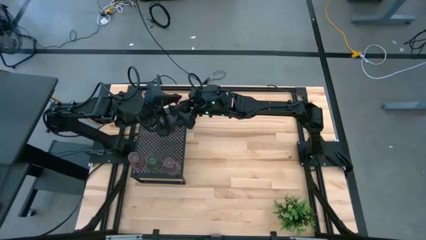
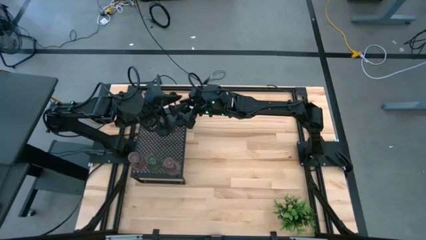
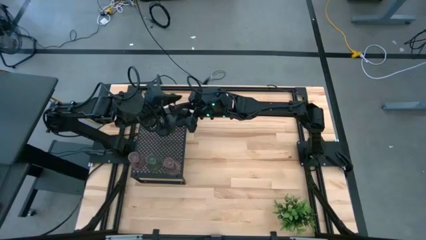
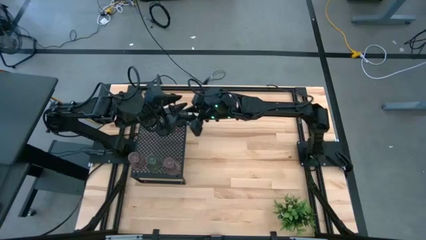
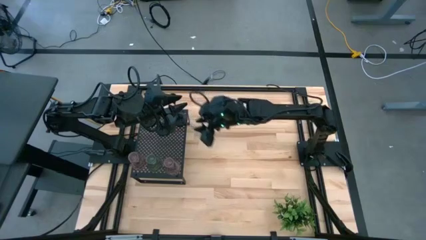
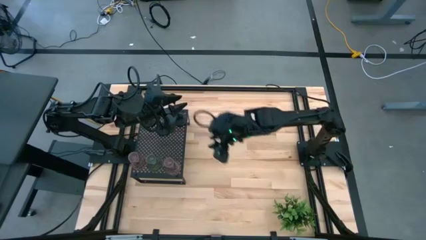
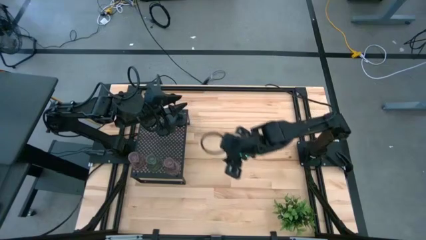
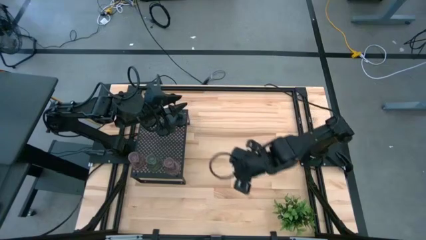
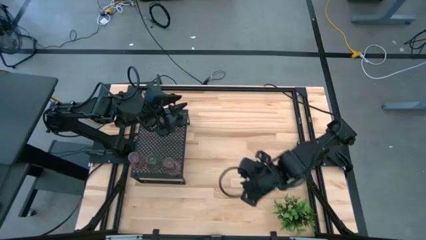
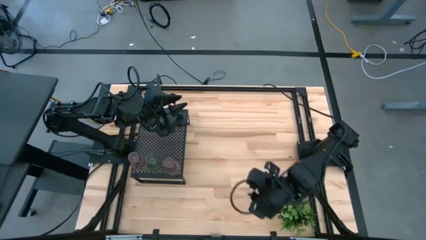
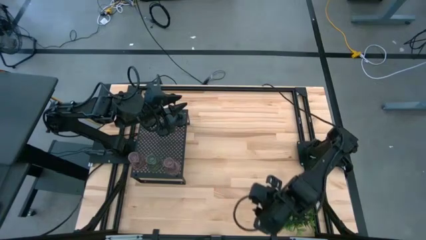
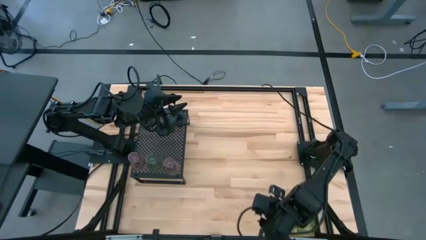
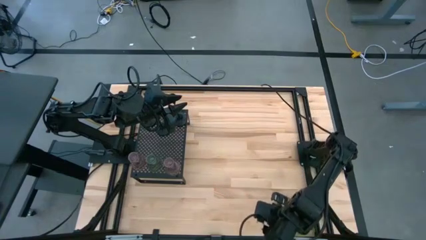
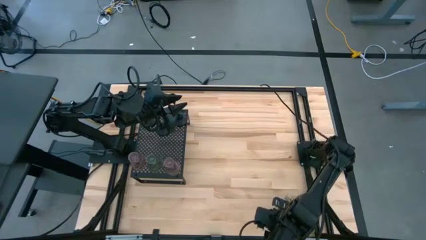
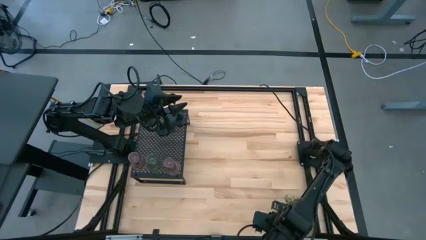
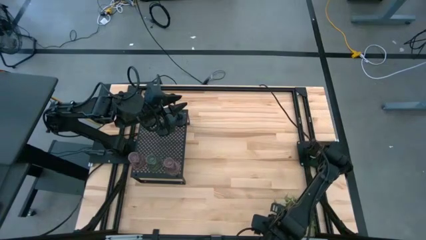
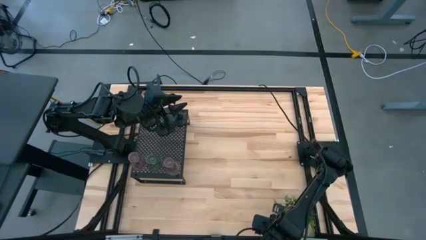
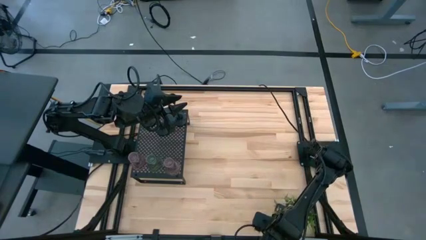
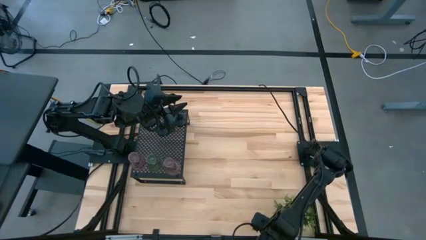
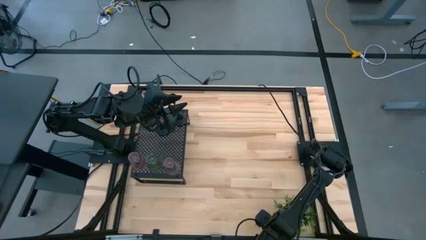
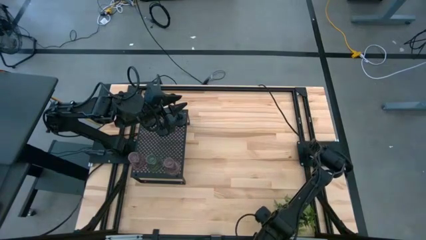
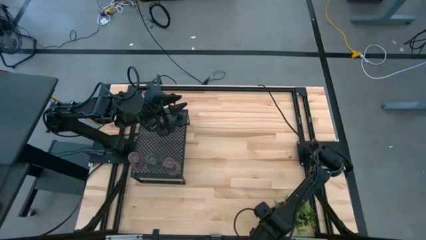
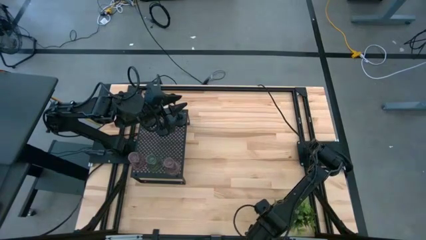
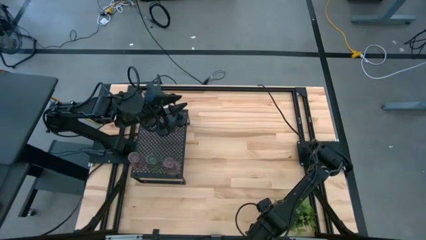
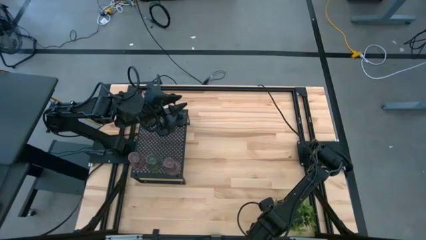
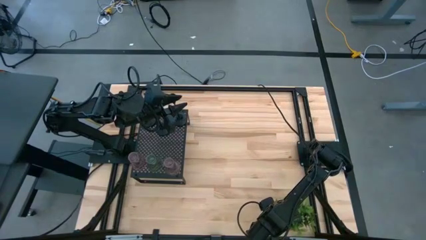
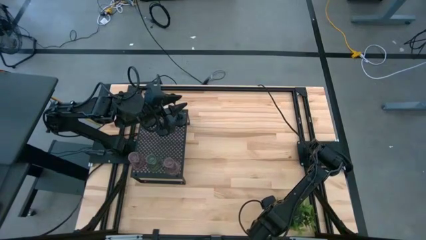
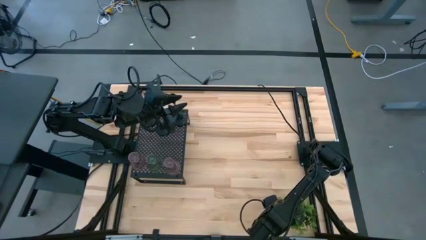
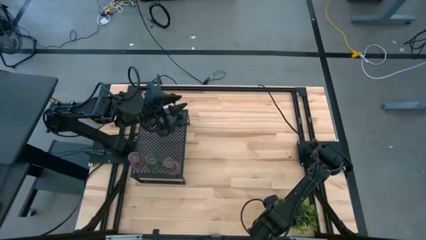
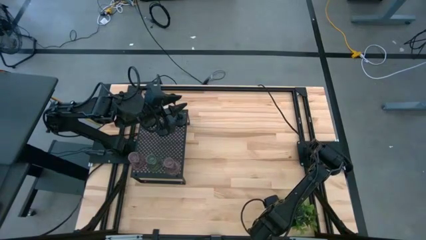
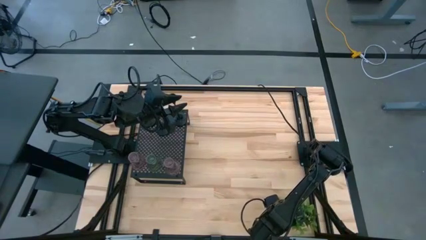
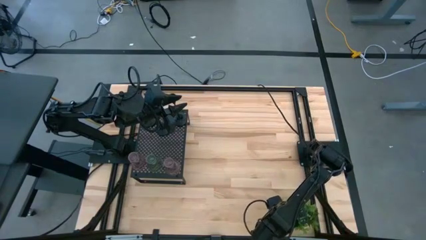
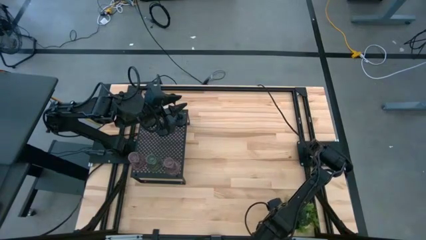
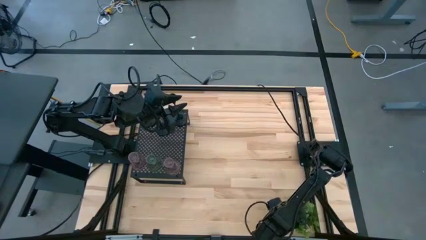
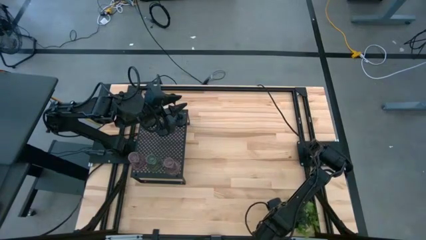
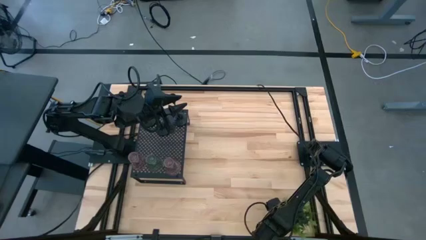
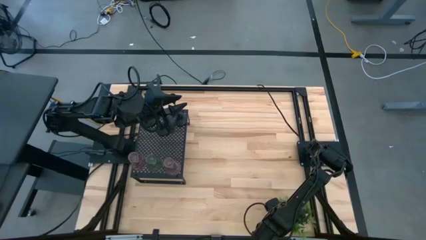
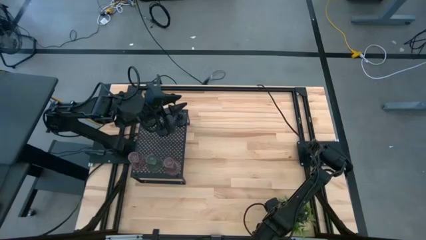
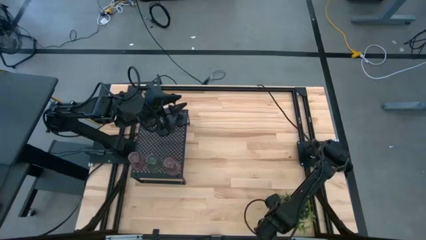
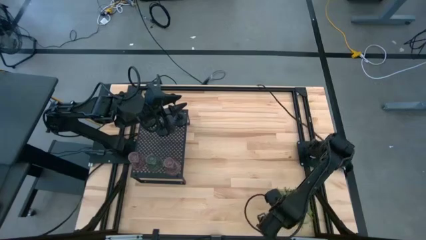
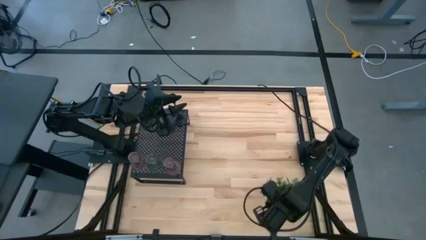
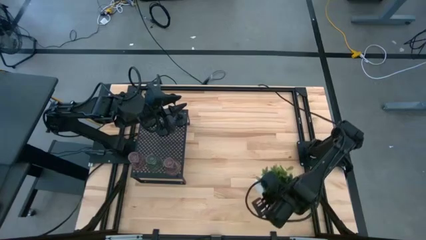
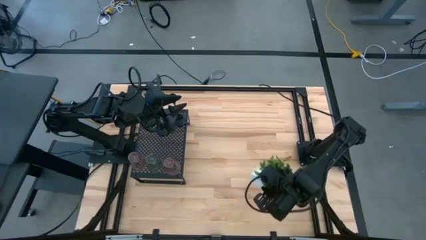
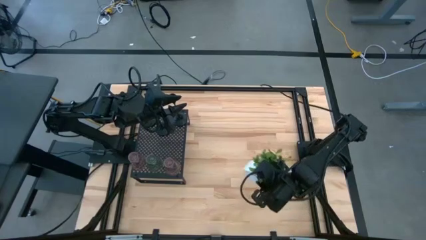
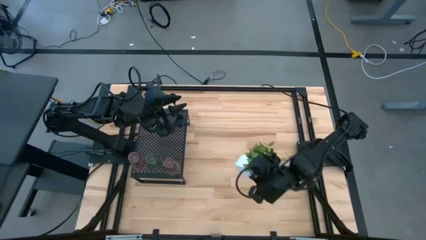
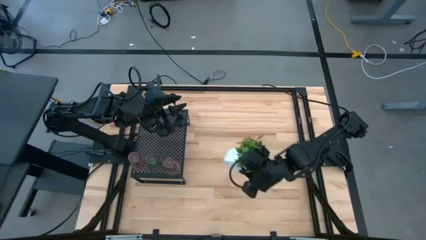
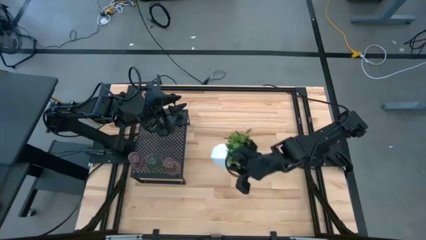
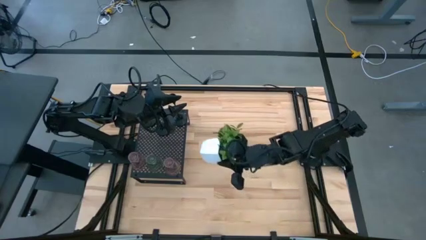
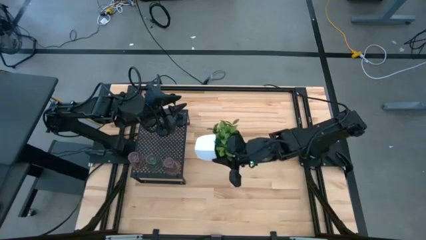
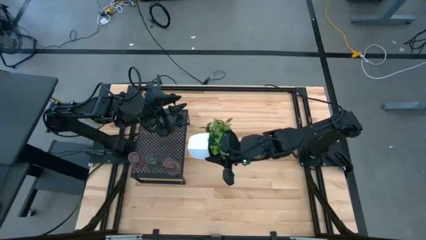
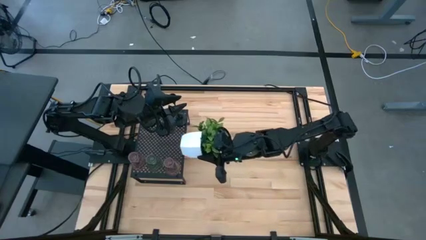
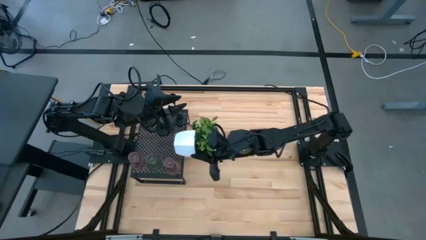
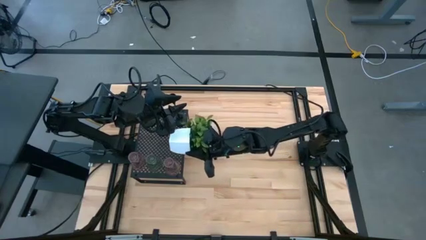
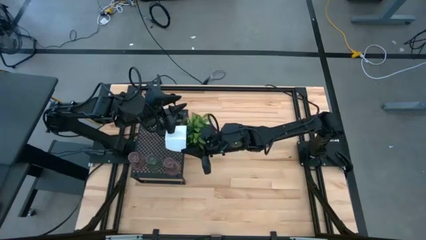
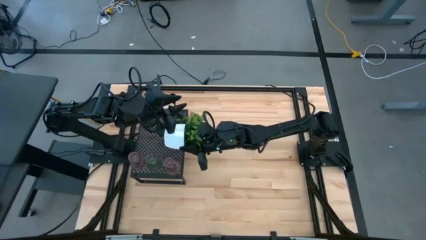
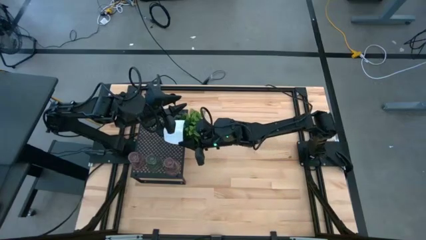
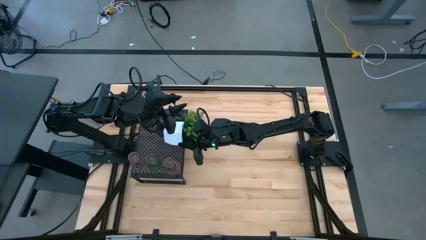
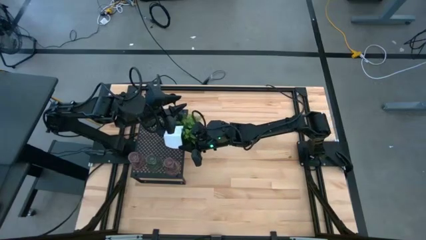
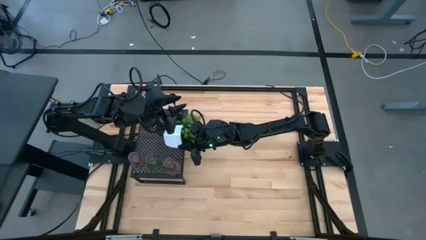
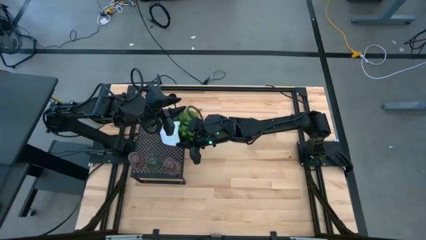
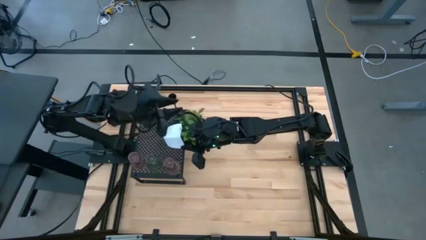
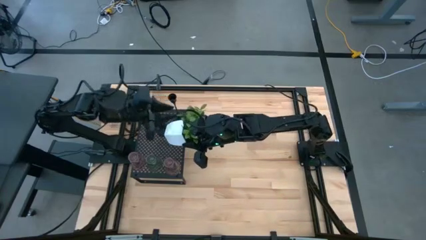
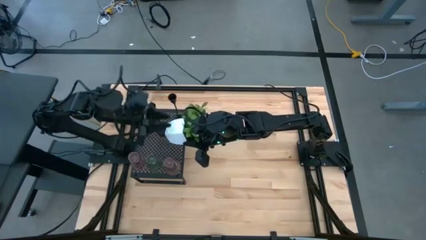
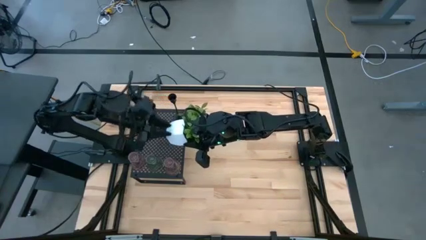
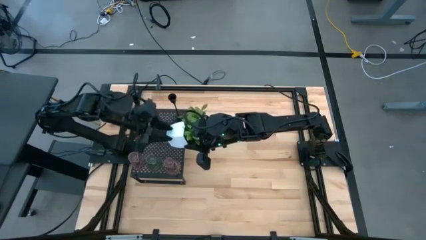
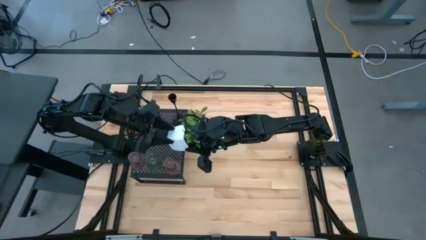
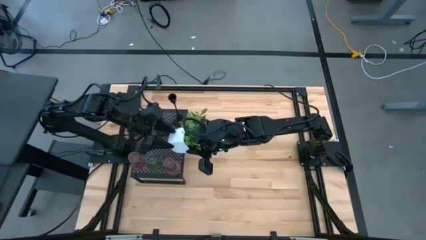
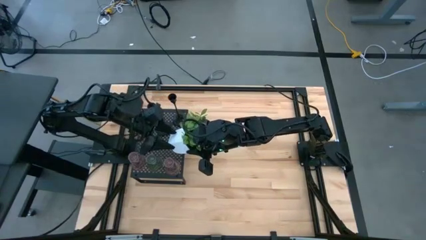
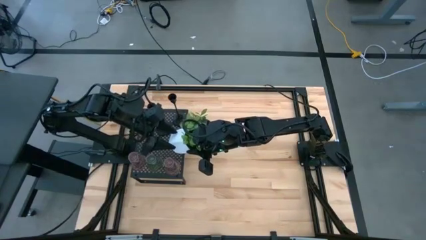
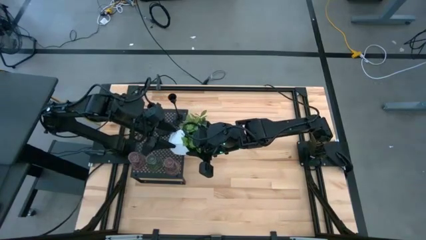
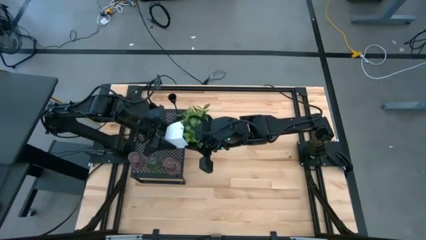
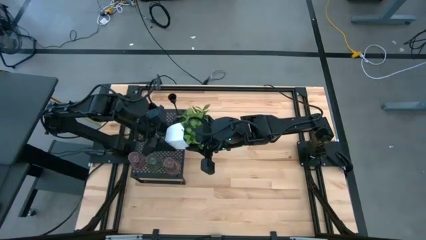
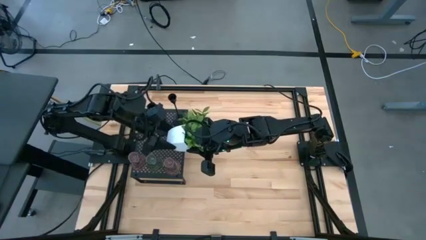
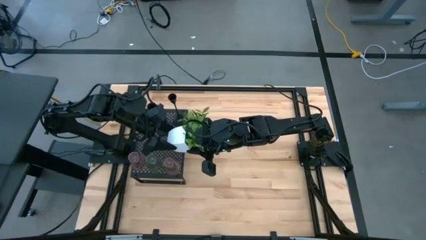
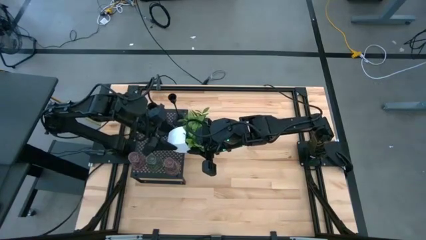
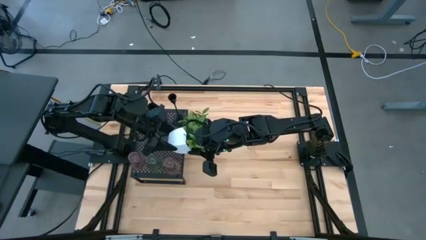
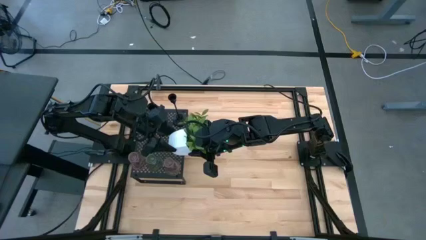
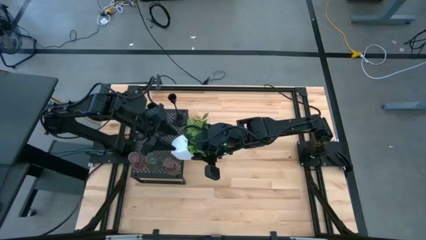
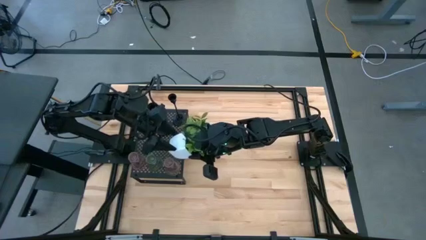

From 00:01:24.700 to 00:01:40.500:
Task: Pick & Place candle stick holders
Put the decorative plant on the shelf
